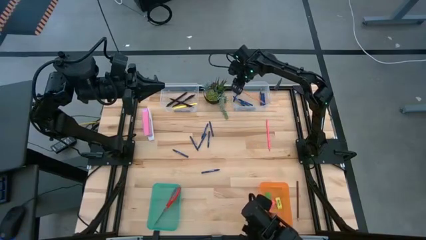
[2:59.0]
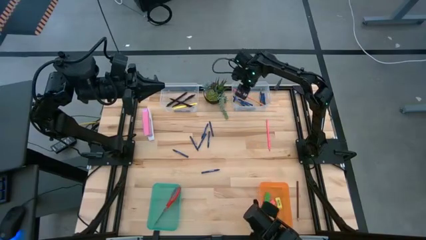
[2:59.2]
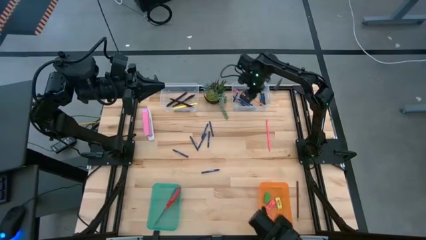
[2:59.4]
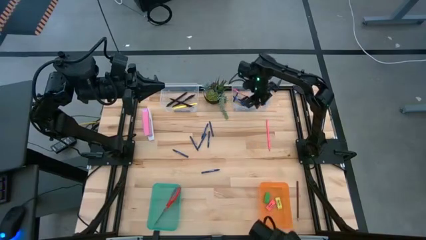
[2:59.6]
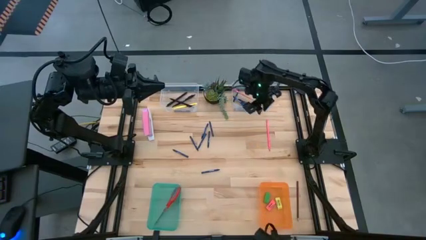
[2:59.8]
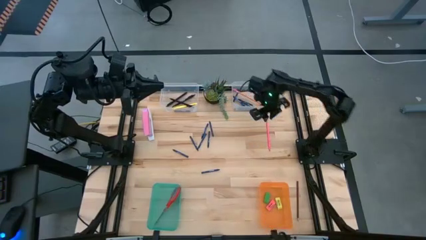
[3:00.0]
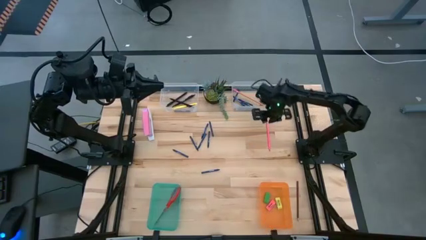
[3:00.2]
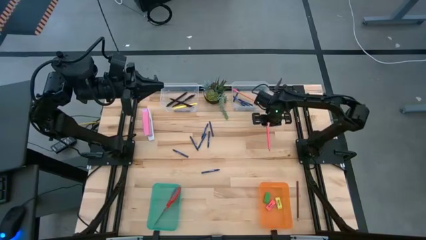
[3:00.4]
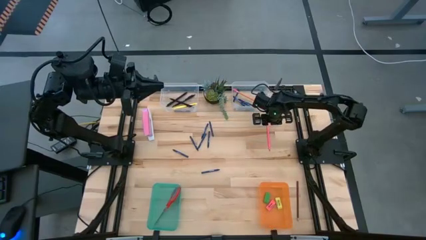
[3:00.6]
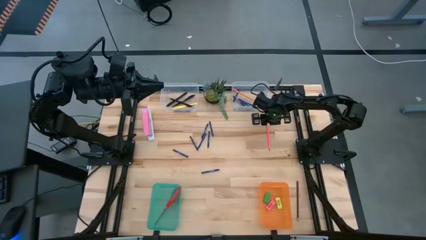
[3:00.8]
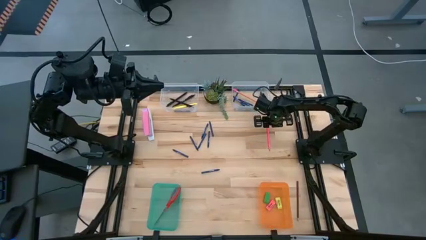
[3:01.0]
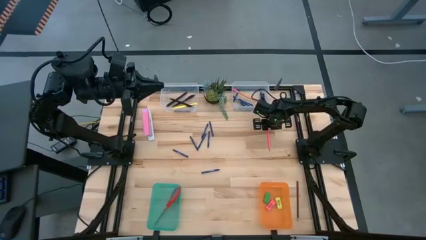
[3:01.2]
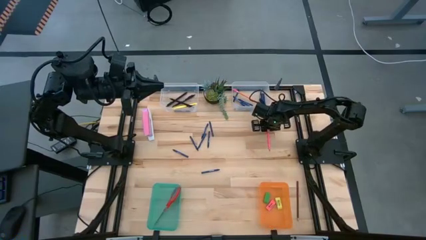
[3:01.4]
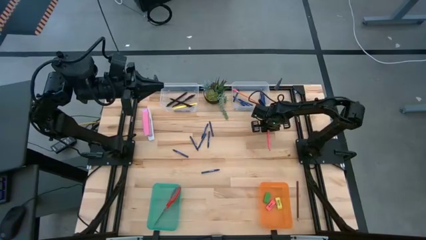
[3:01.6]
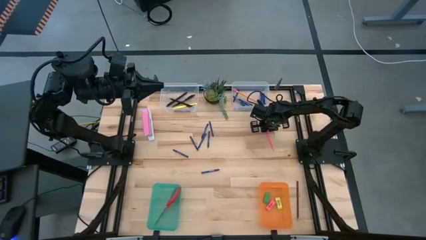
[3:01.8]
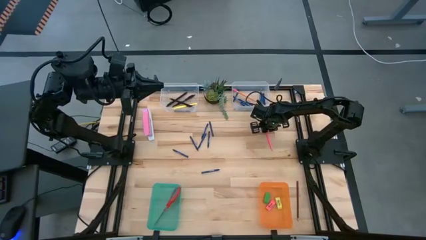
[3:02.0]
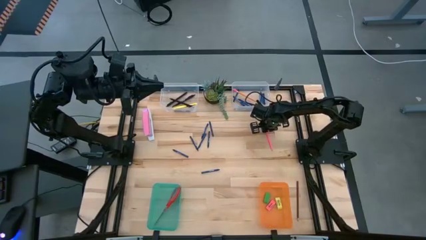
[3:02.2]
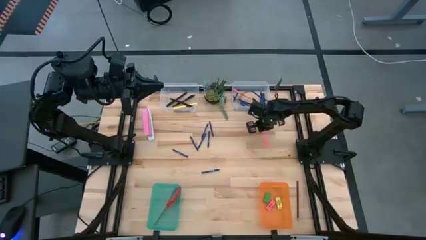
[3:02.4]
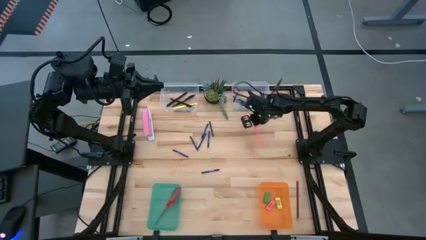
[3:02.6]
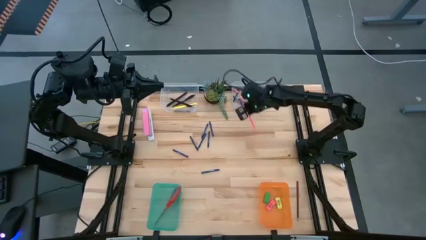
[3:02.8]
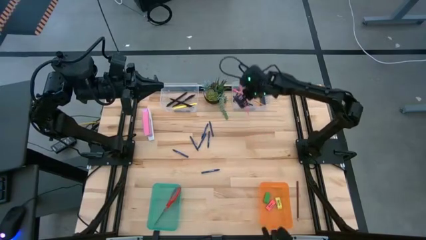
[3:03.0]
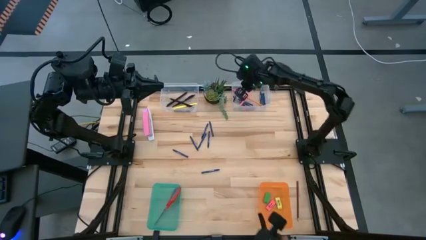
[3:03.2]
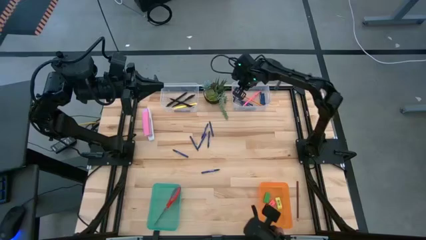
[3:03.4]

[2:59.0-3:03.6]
Task: Sort crayons/erasers/pens/pencils in bins
Put the pink pencil into the right transparent bin

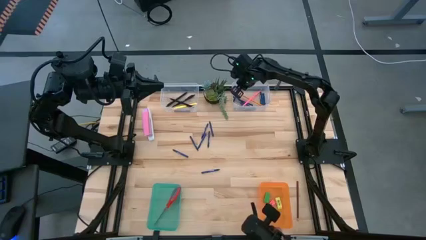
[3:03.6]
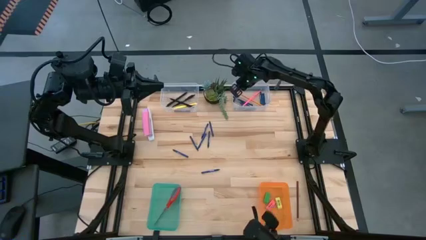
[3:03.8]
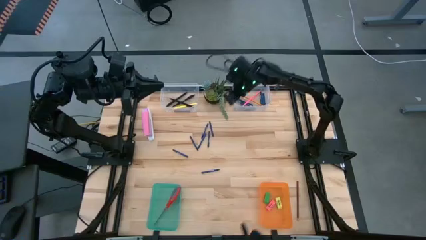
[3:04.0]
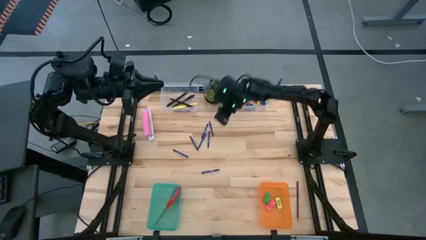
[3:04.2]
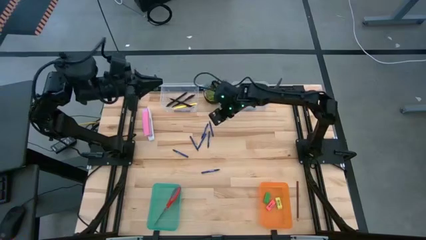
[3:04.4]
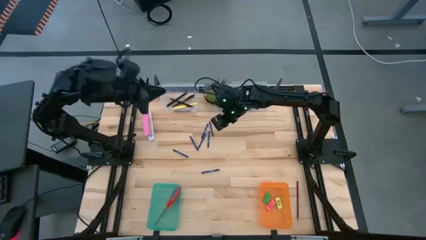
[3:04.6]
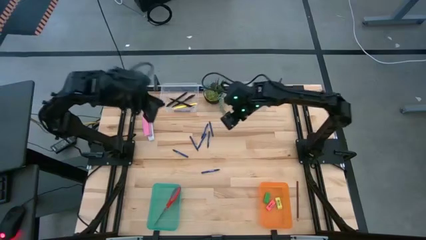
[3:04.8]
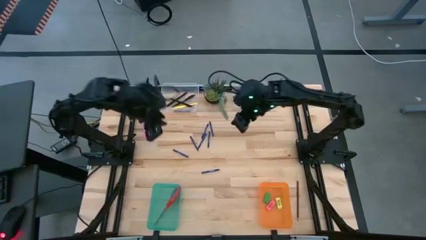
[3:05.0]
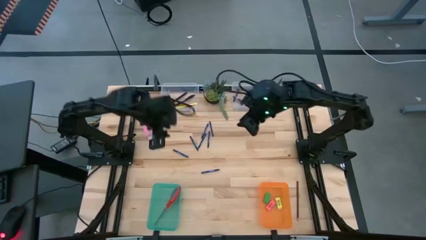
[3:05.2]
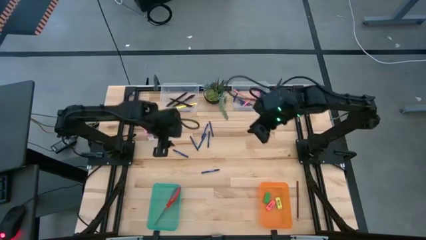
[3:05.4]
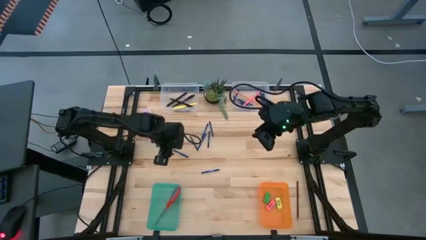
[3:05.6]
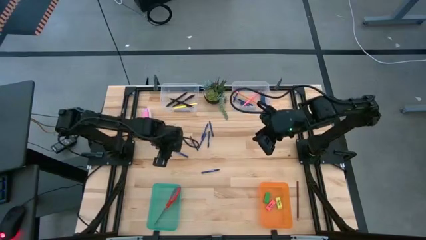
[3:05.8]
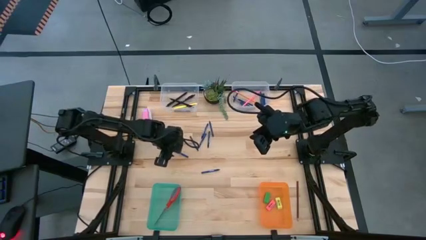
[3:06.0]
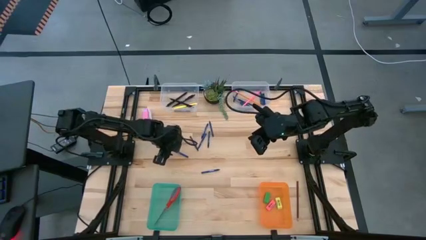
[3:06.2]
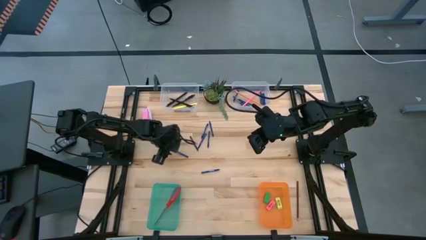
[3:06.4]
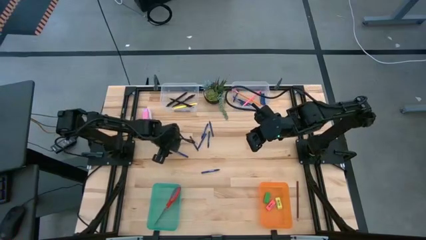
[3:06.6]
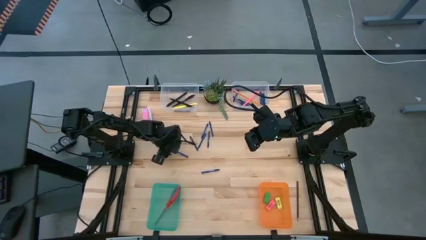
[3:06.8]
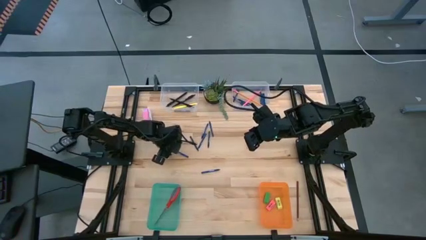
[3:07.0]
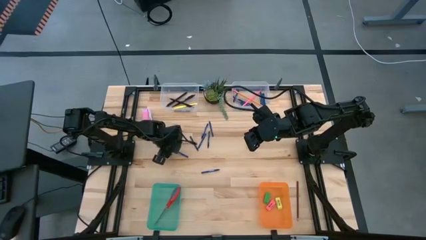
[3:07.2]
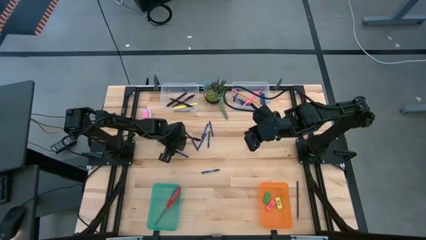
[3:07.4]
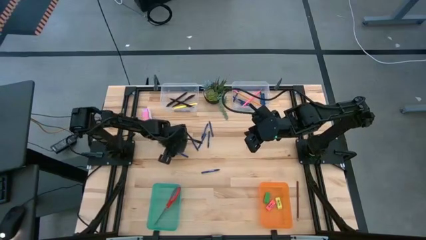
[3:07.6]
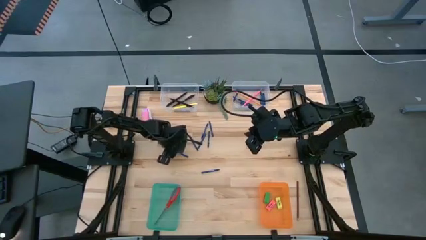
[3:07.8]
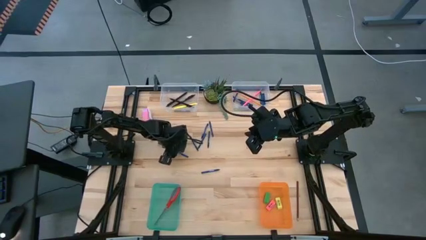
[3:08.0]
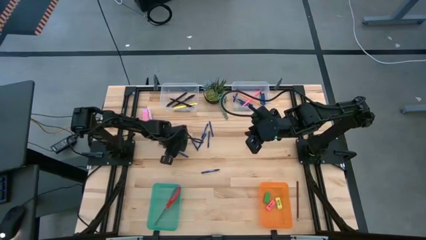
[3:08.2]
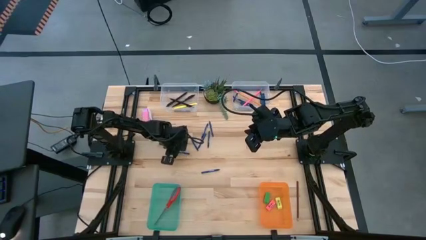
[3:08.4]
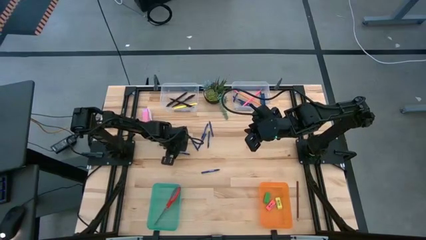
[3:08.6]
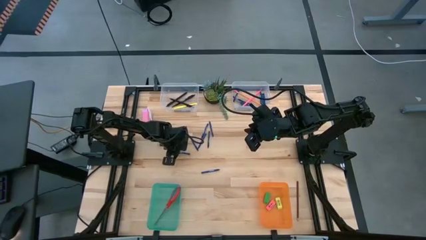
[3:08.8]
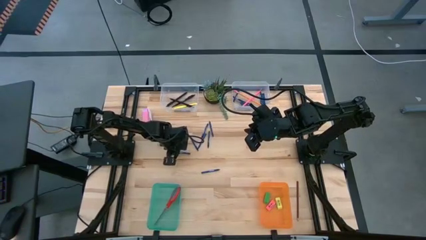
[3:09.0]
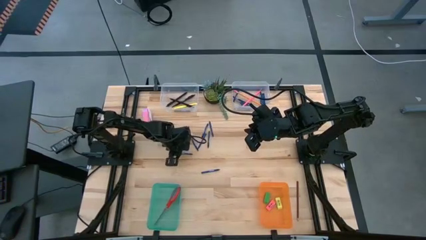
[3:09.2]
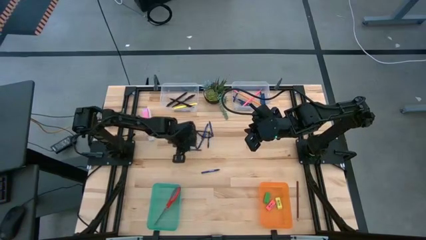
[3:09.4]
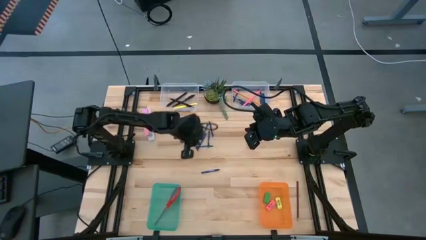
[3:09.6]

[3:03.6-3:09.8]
Put the blue crayon into the right transparent bin

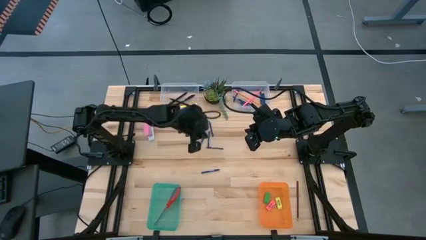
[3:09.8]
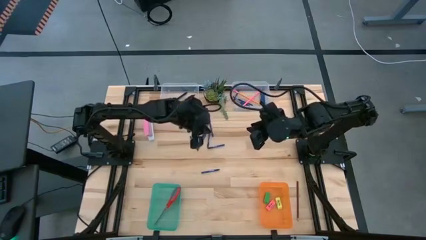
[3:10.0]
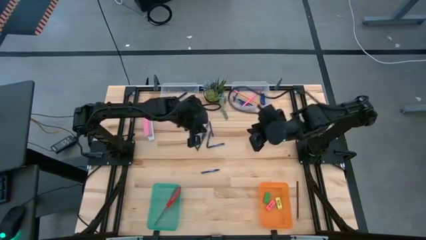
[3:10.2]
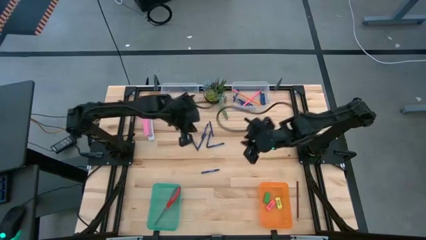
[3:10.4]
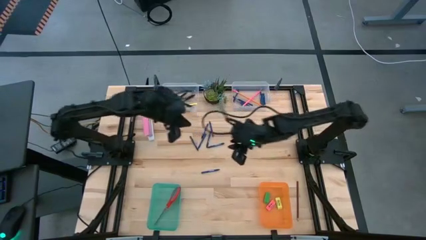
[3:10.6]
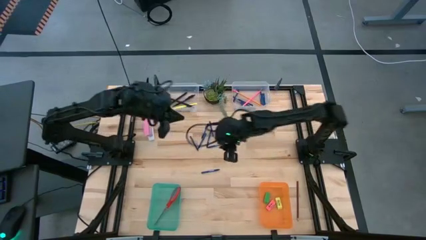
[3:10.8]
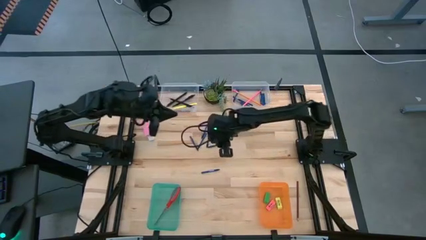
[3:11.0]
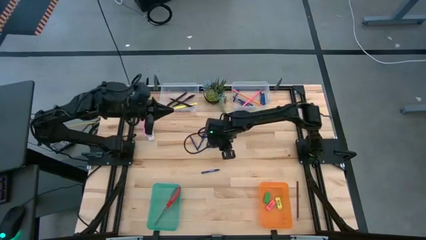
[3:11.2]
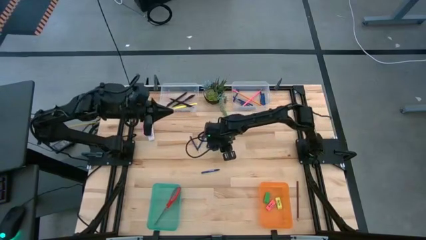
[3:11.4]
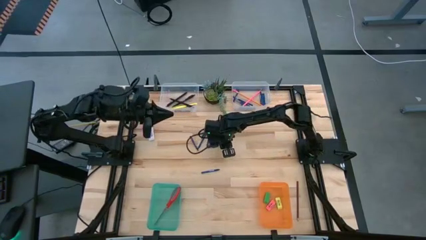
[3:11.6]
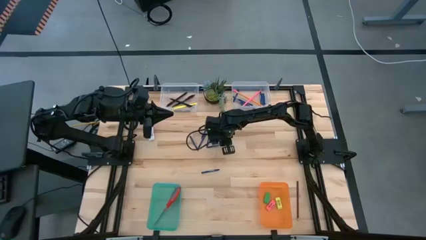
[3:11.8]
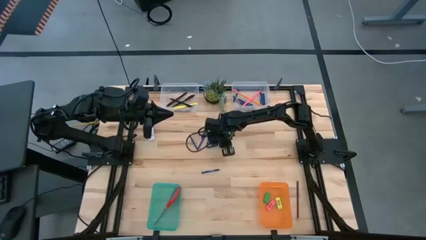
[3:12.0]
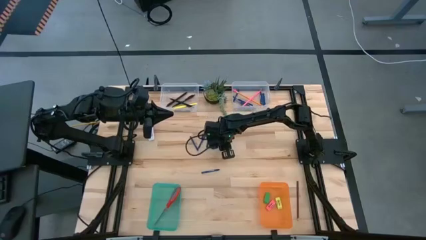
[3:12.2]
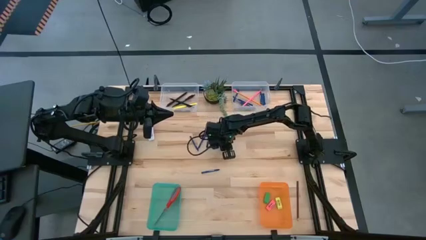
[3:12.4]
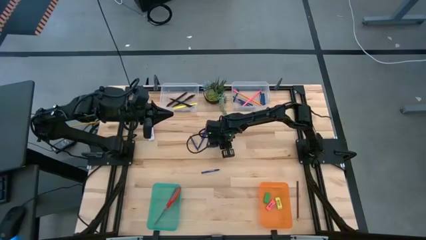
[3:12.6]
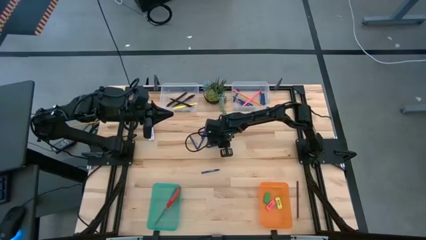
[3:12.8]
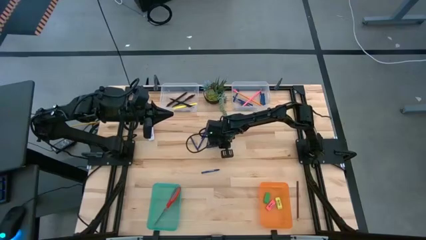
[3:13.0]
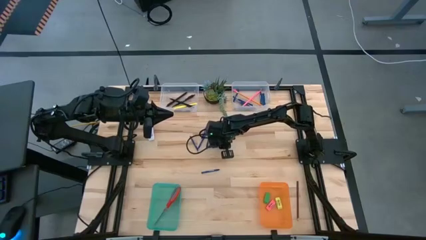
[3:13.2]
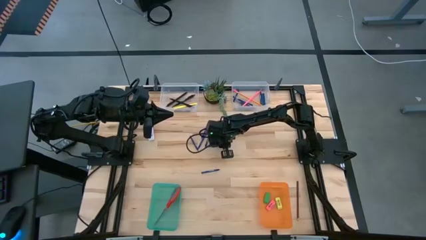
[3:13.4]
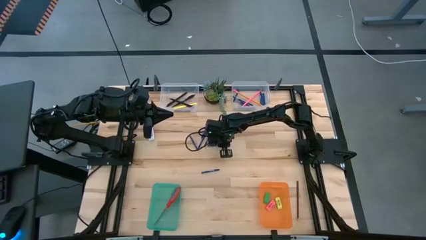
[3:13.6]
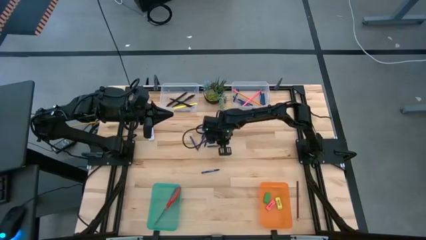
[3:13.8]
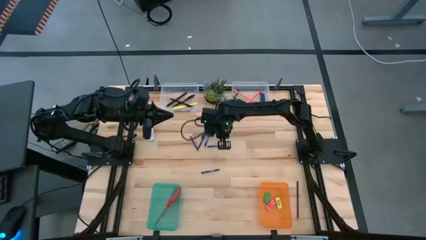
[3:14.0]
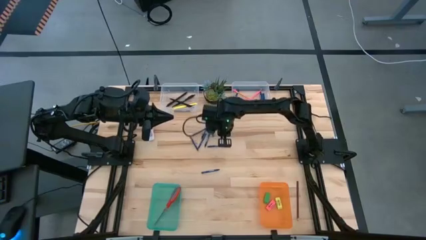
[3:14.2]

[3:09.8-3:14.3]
Put the blue crayon into the right transparent bin

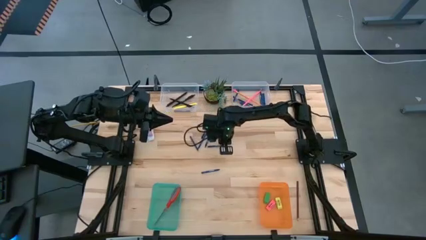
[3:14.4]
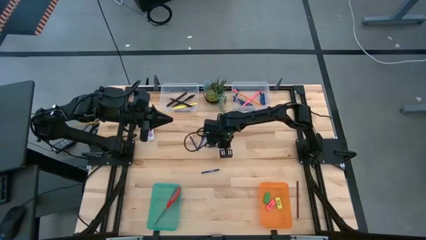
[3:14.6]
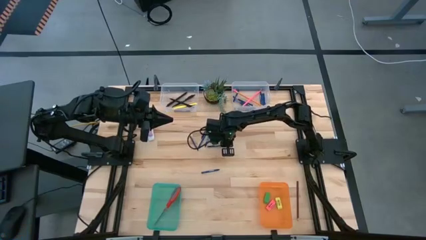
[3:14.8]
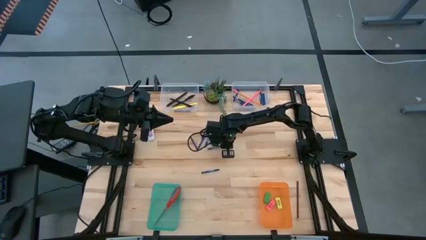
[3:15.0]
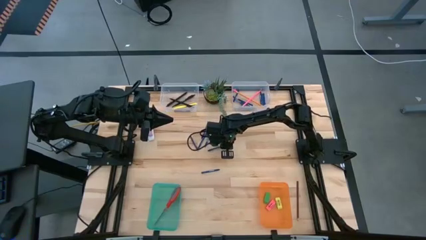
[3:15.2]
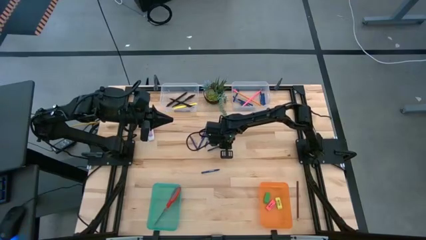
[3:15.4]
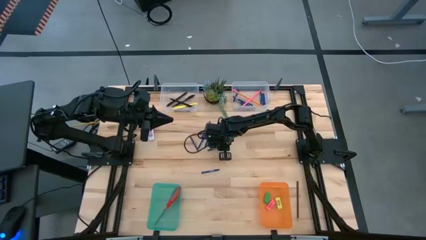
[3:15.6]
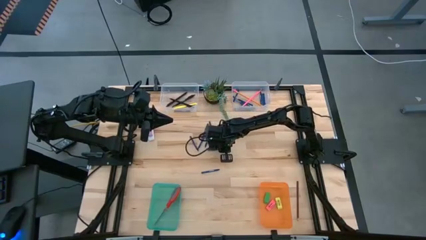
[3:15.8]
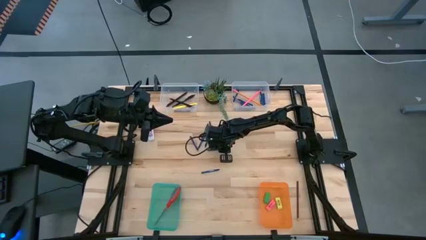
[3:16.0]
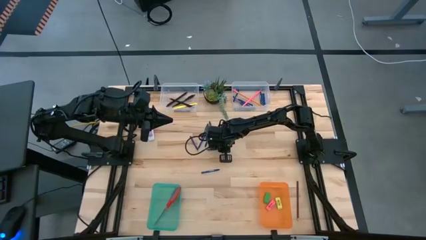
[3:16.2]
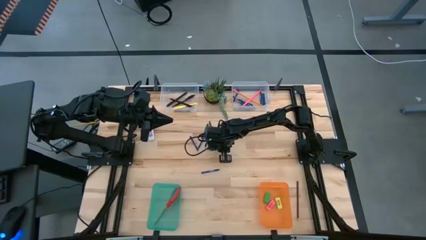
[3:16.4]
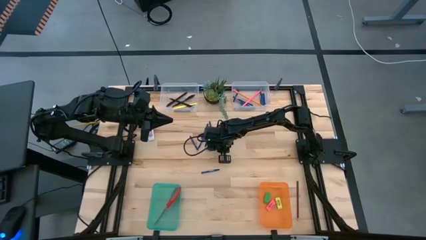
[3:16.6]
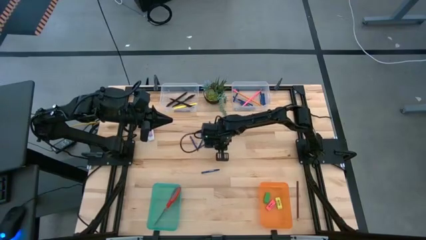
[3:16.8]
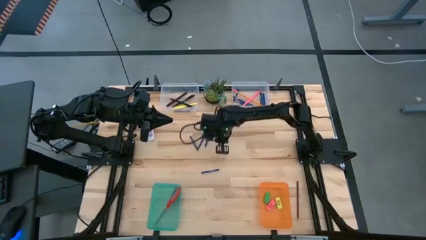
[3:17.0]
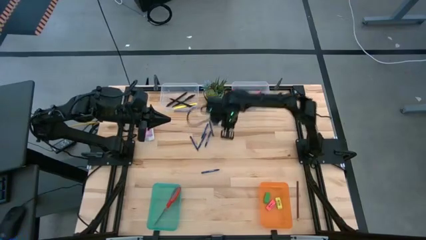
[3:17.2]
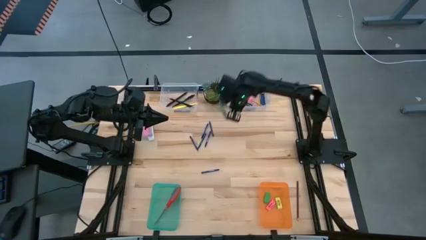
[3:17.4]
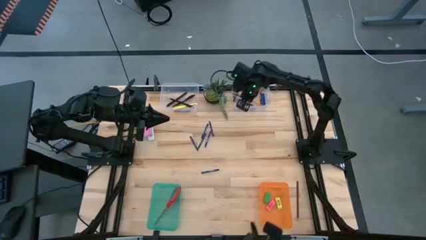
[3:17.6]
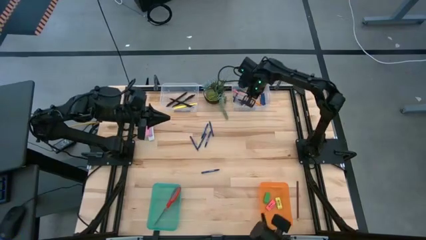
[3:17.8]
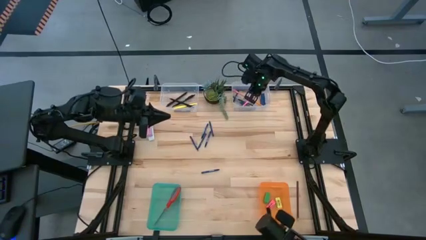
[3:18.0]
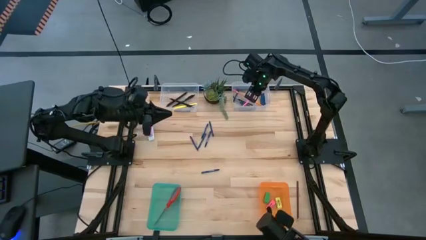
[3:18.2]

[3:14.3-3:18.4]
Put the blue crayon into the right transparent bin
